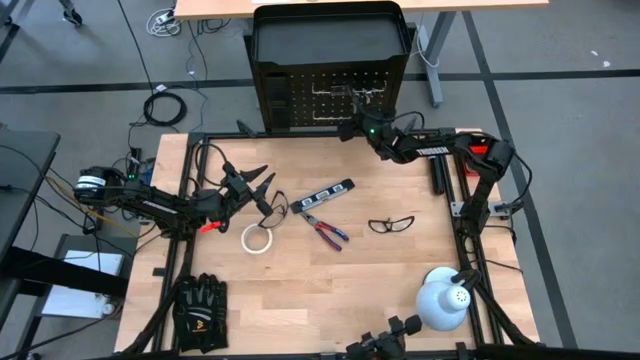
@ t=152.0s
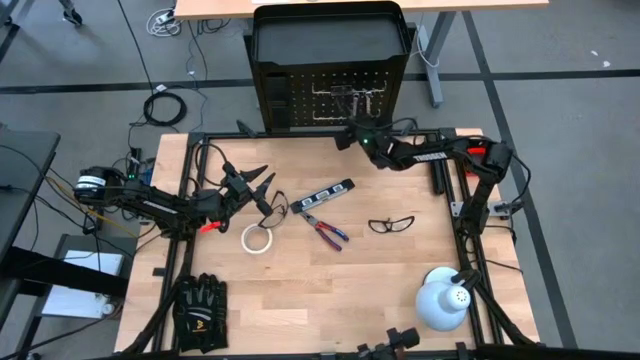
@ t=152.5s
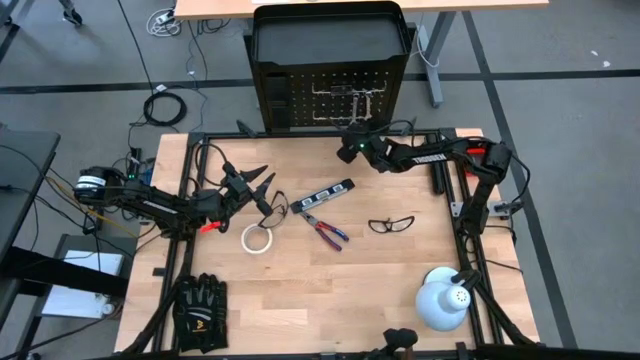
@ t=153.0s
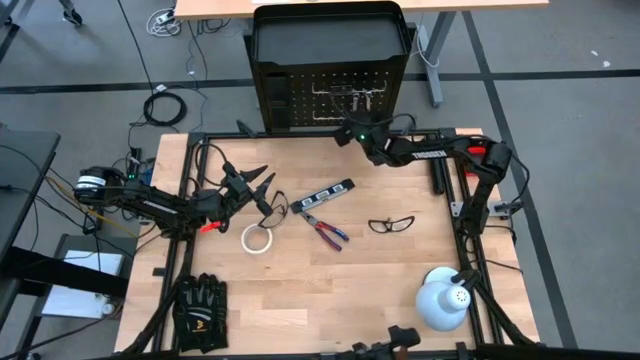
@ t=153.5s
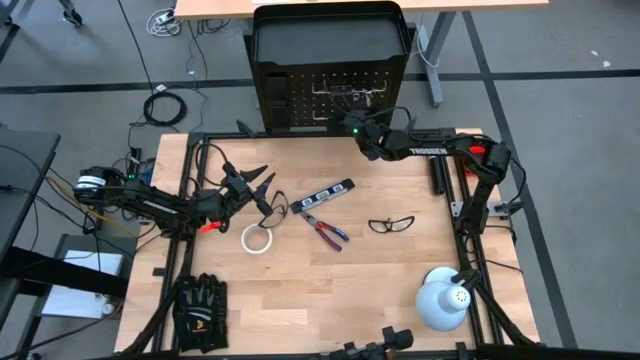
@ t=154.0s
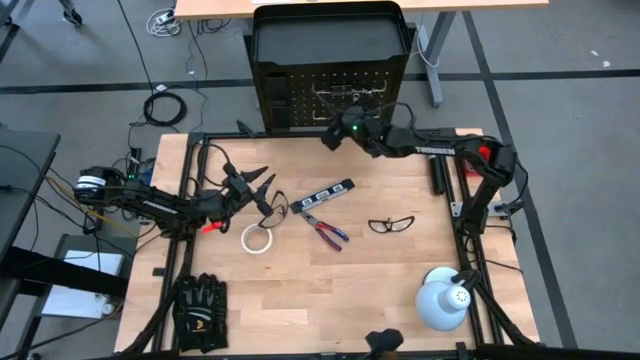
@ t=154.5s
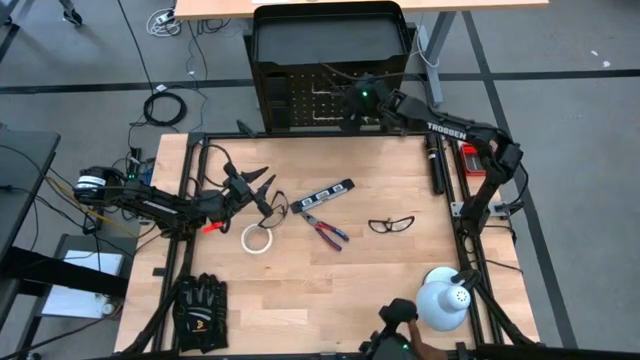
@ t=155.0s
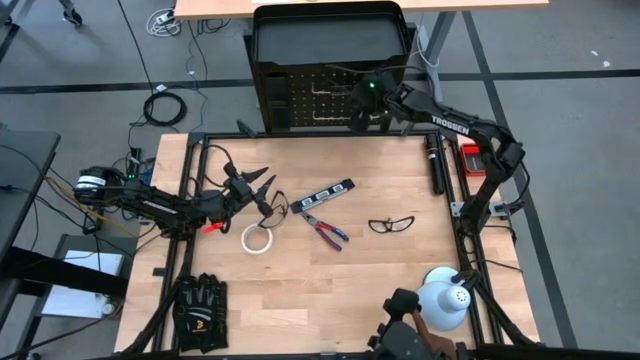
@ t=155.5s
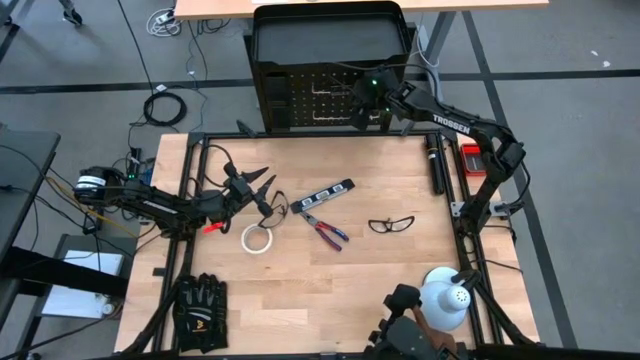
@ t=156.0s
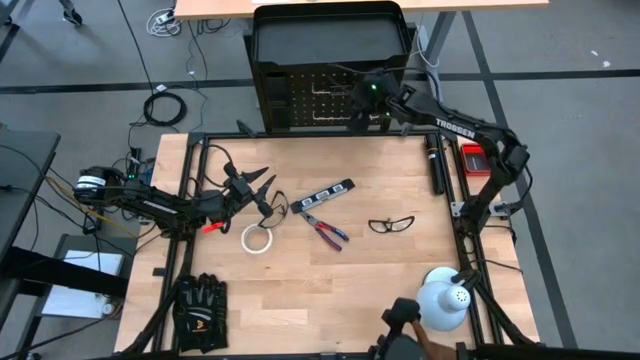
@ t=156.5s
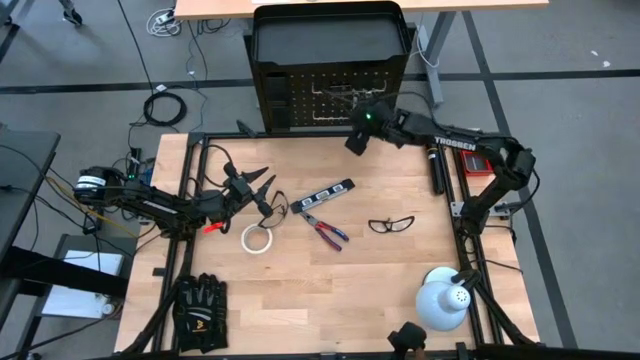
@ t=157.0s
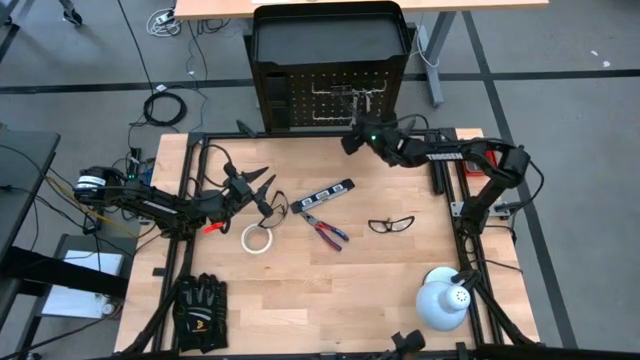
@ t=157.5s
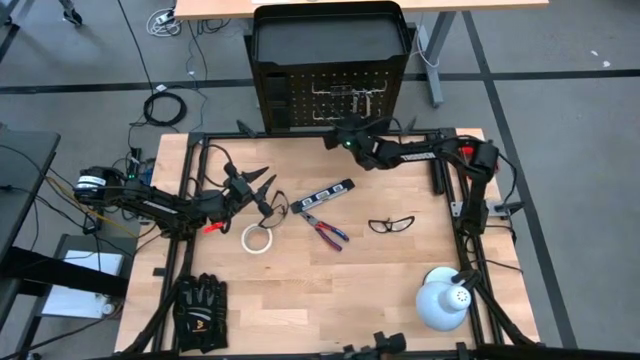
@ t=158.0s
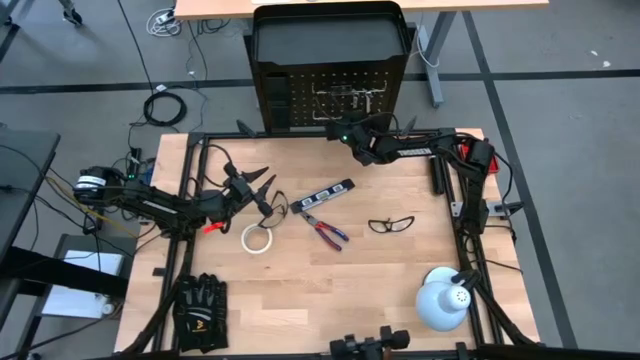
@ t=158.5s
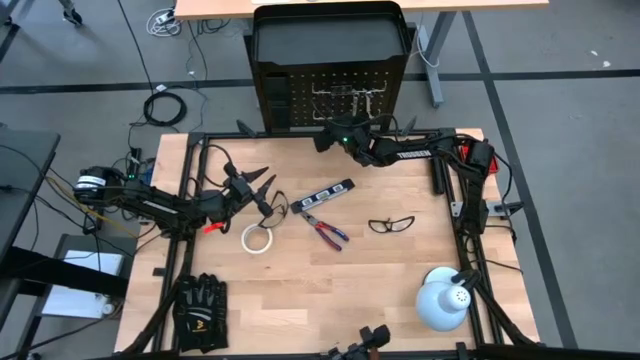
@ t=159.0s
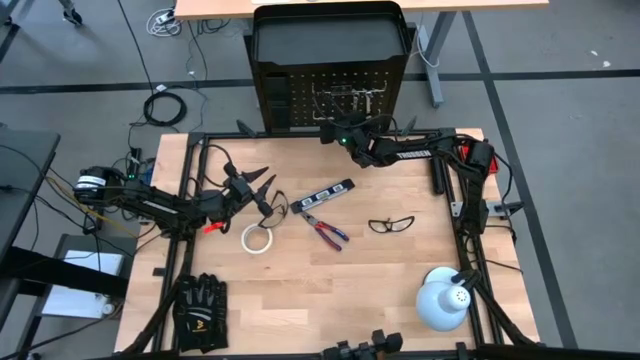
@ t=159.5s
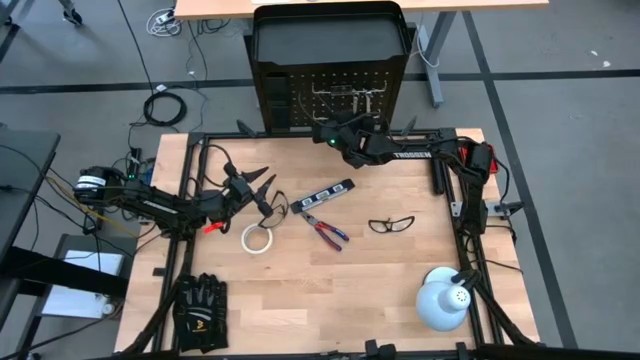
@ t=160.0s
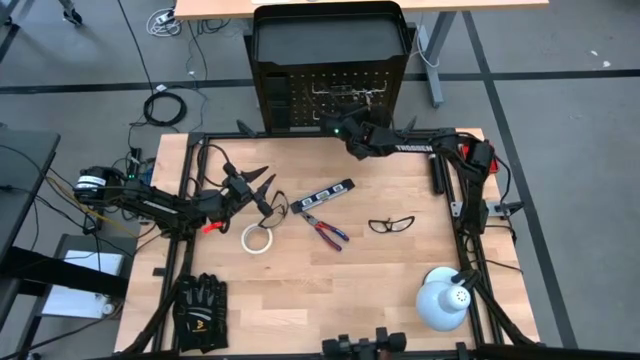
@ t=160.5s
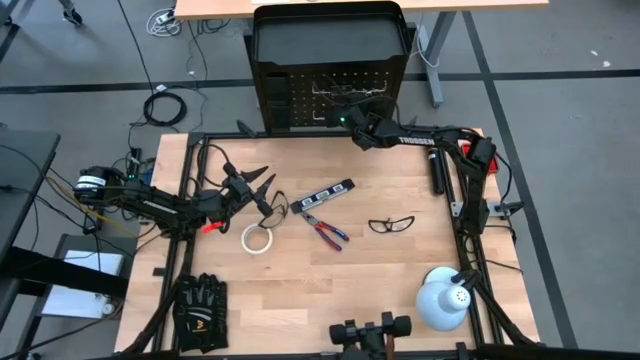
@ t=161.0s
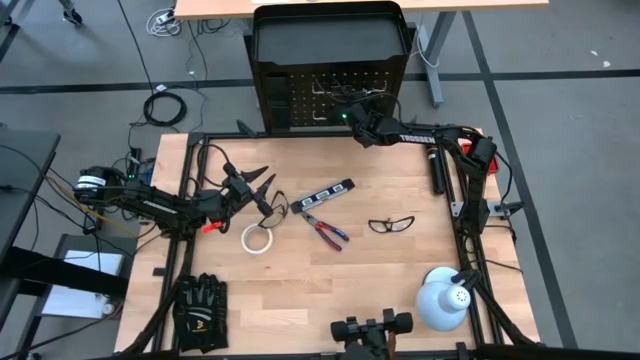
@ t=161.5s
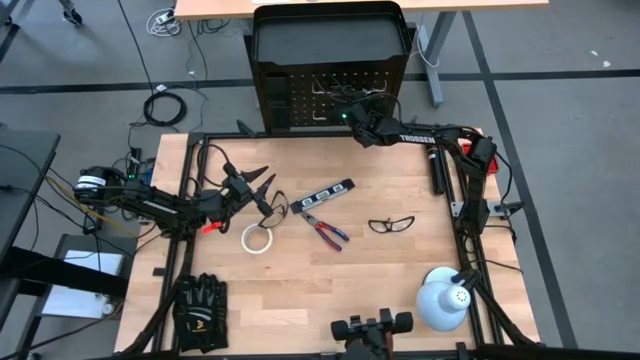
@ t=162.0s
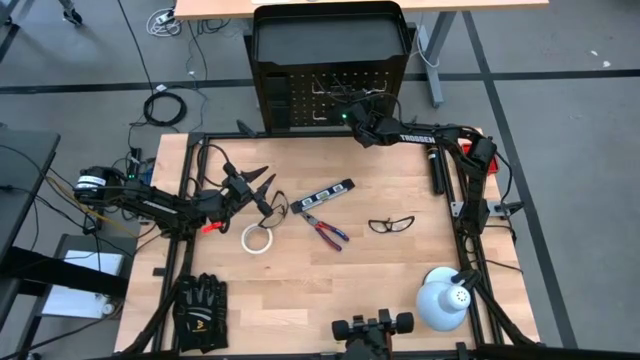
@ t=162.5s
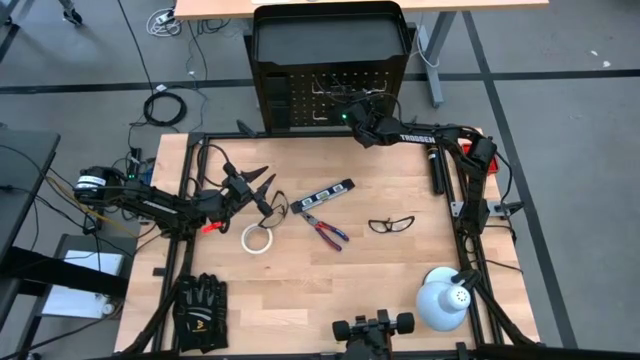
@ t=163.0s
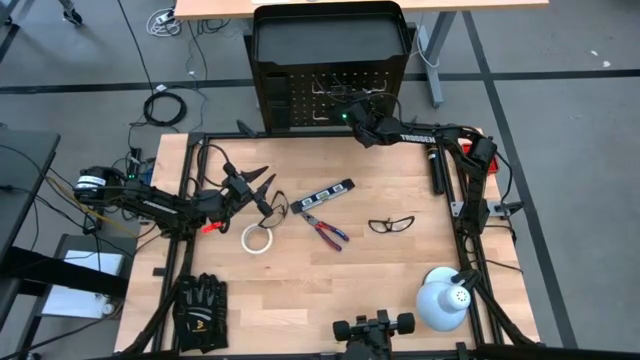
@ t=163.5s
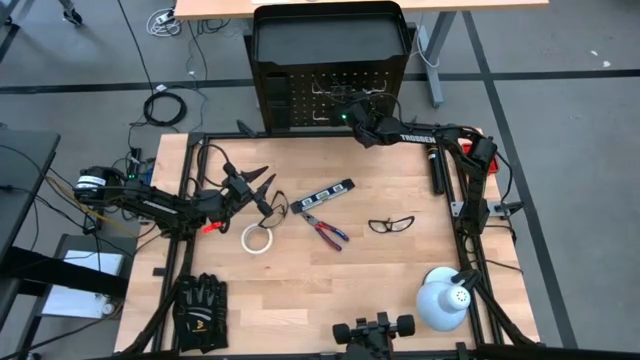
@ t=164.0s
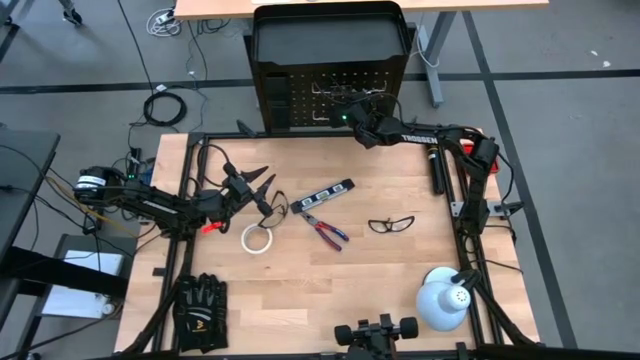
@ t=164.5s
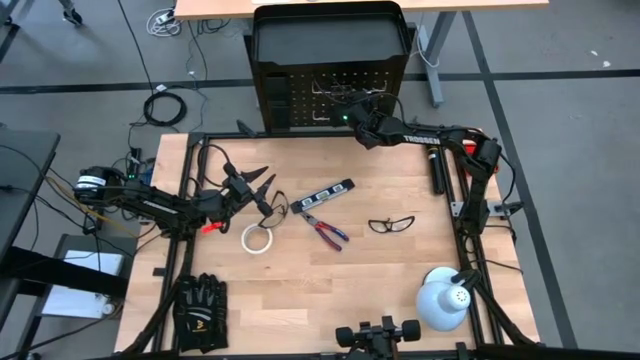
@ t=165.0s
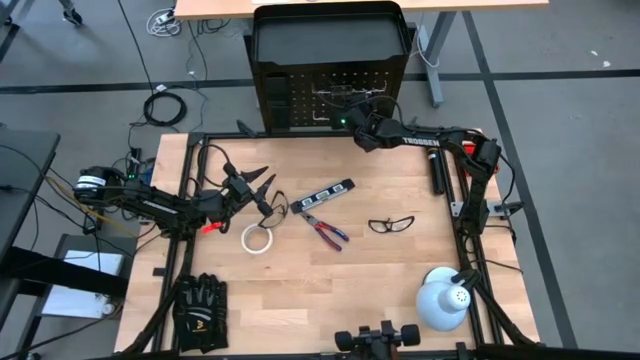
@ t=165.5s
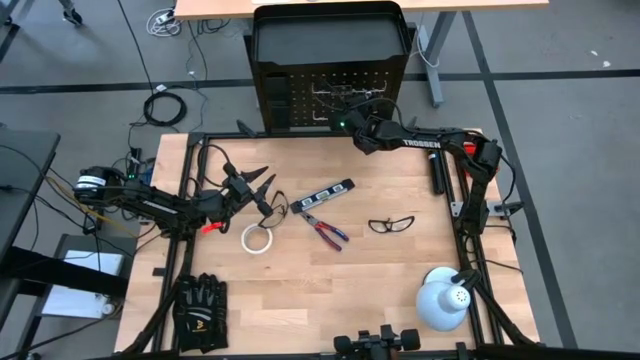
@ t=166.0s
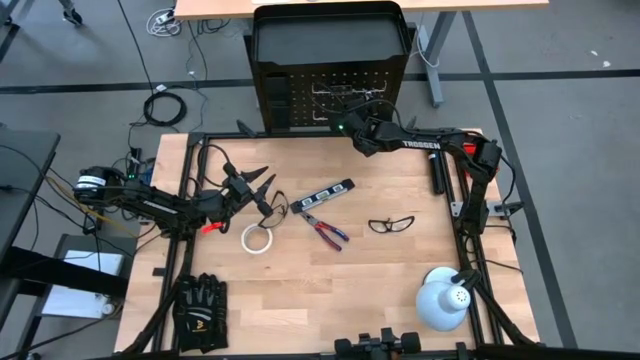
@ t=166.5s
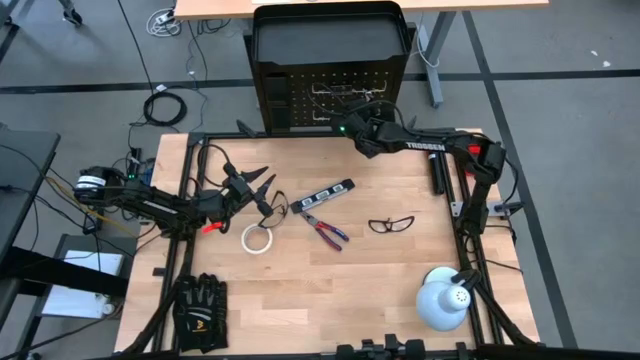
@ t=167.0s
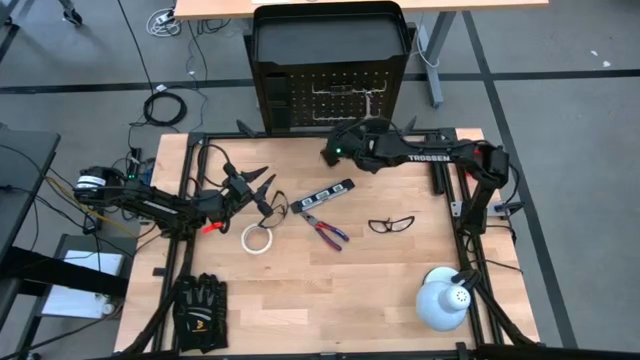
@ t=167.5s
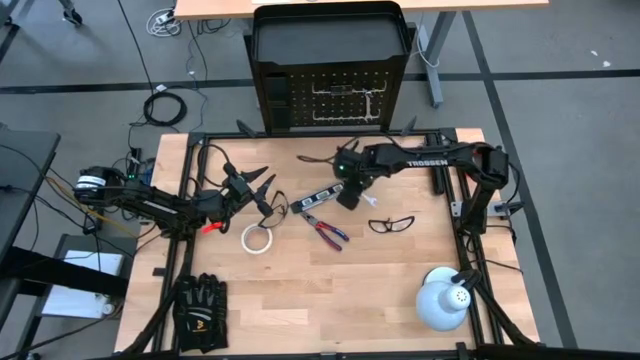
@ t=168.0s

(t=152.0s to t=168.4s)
Task: Hang tools onto peg board
Unhang the left silver wrench from the peg board

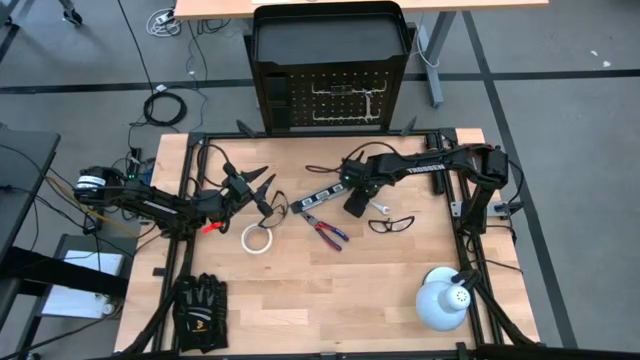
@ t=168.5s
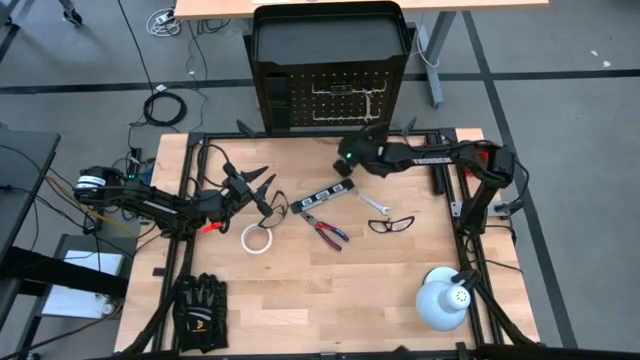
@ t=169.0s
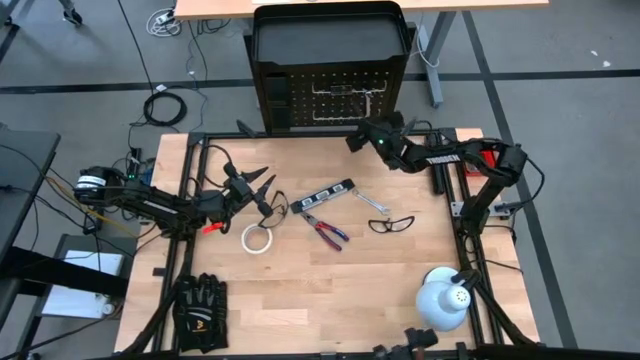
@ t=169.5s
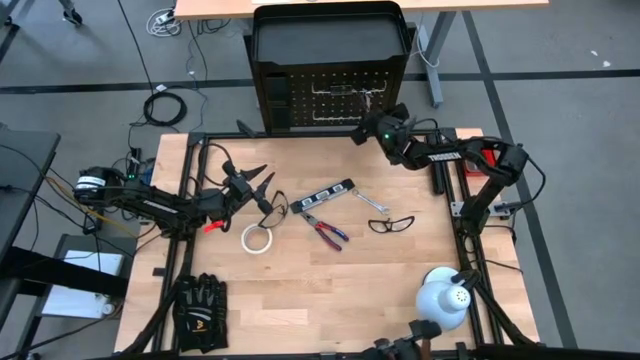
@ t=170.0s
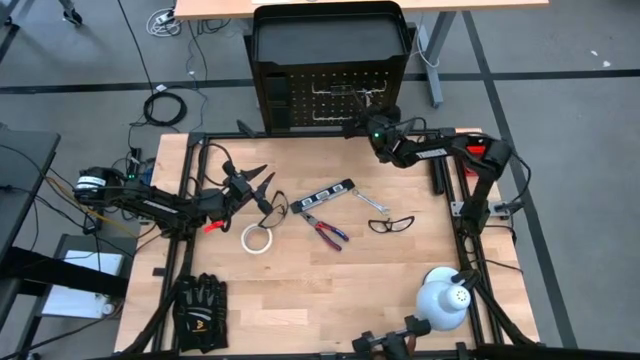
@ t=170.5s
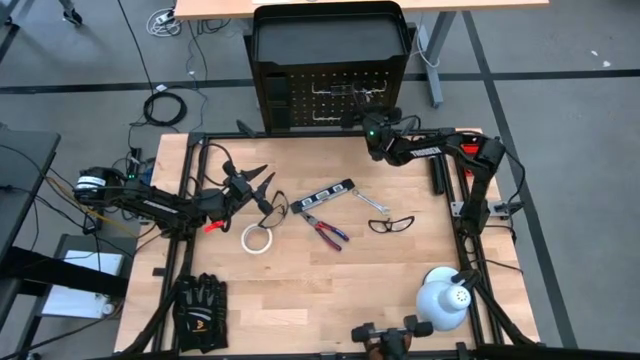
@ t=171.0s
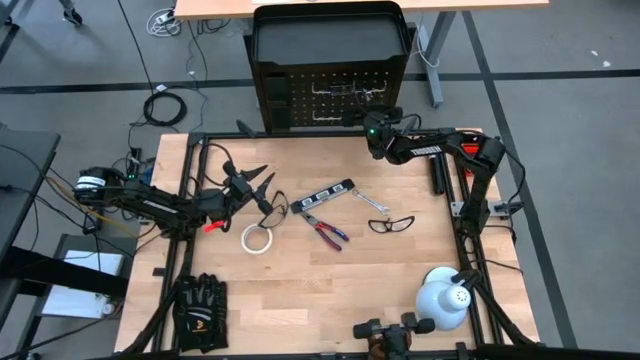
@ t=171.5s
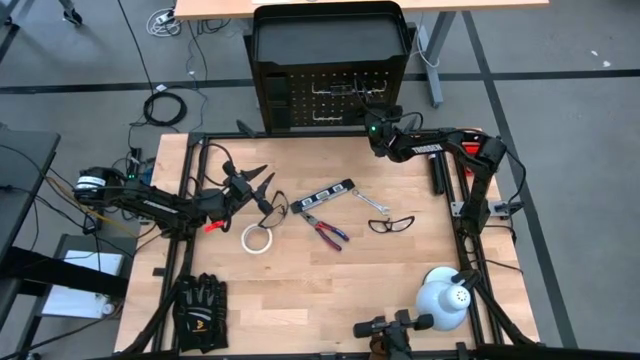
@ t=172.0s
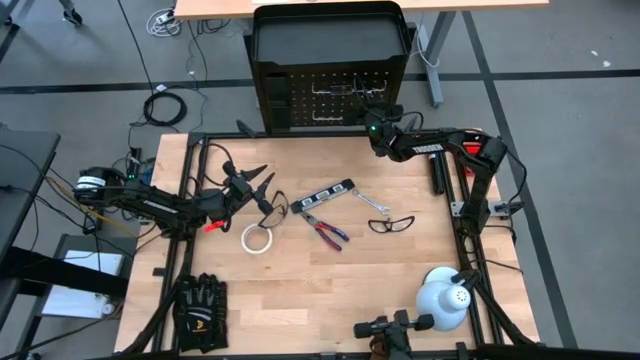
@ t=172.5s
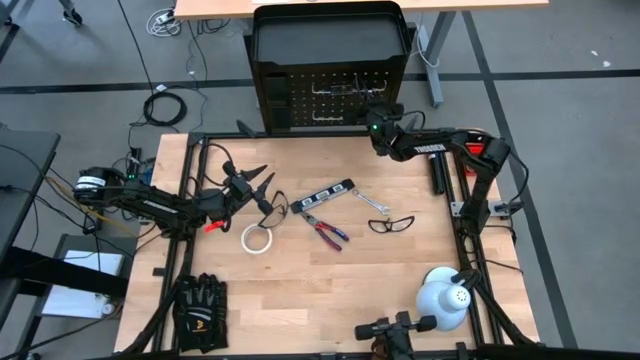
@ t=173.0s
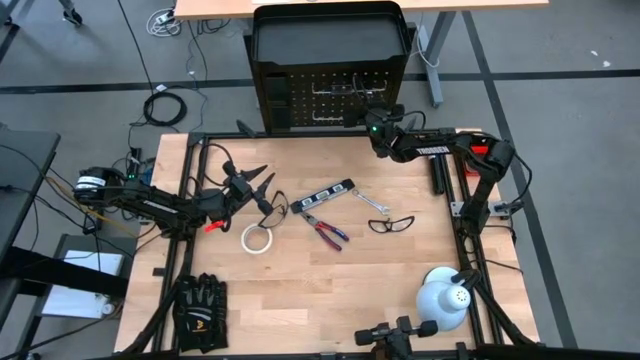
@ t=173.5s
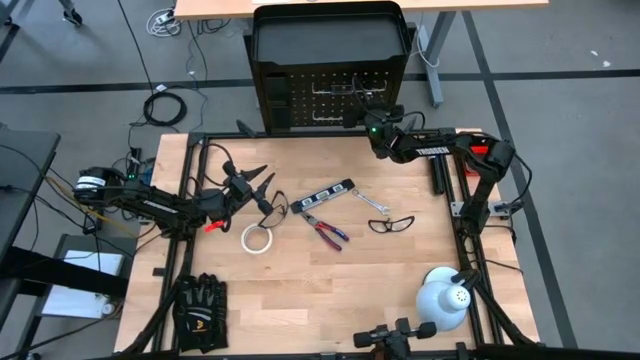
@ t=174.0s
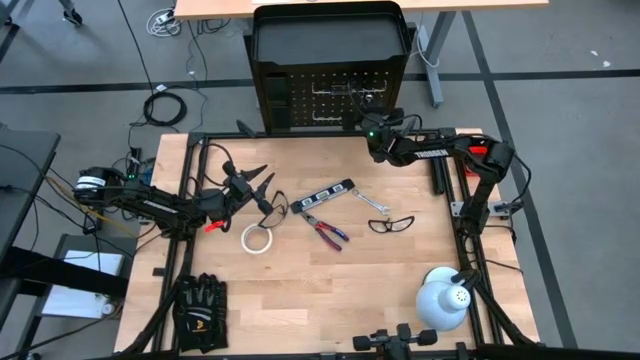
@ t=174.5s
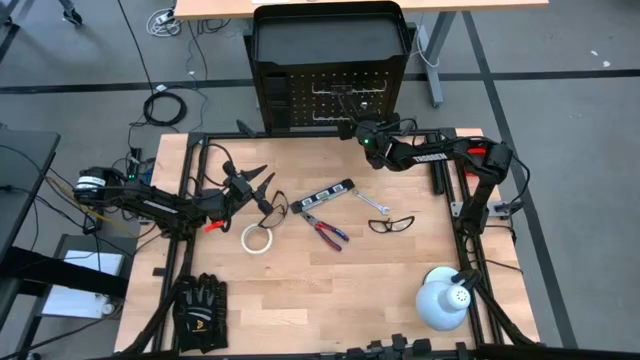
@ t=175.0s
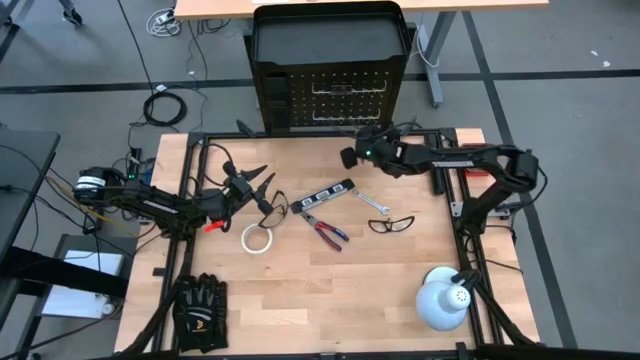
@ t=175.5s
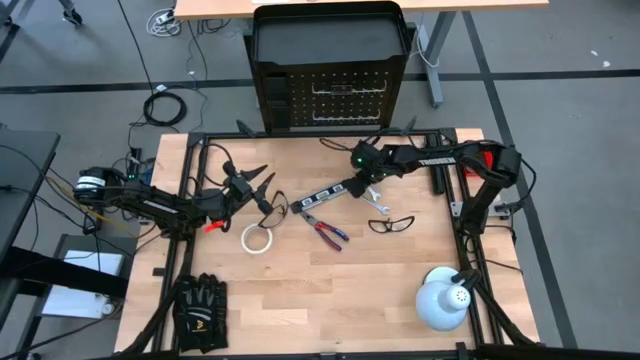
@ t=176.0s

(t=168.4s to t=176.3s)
Unhang the silver wrench from the peg board
